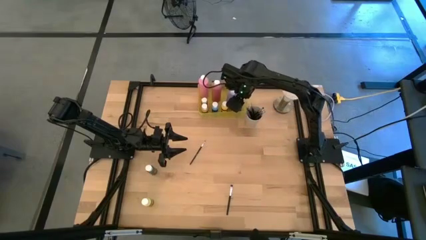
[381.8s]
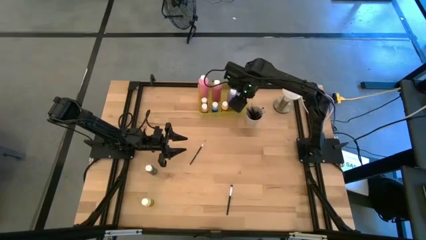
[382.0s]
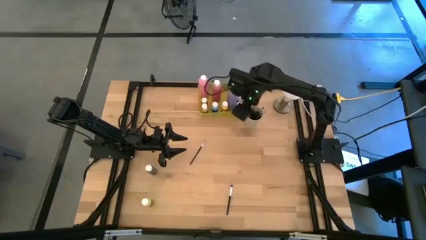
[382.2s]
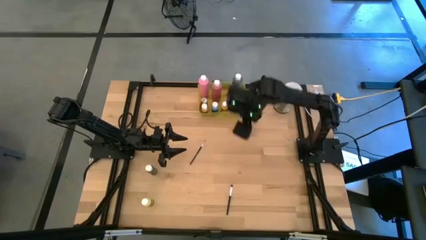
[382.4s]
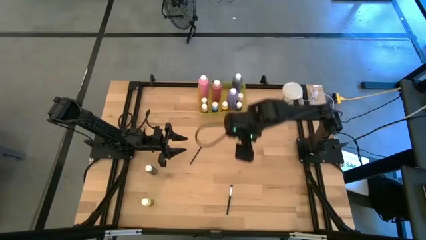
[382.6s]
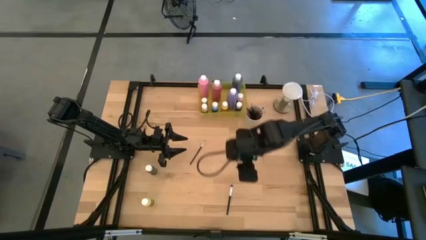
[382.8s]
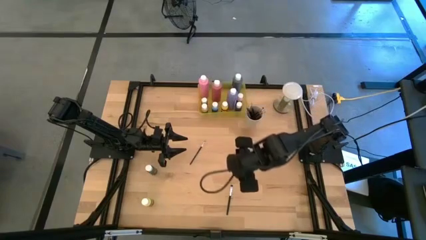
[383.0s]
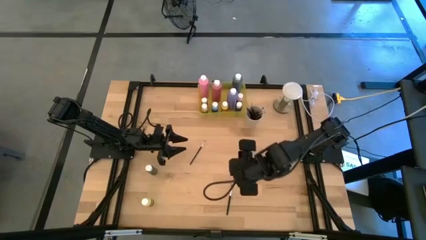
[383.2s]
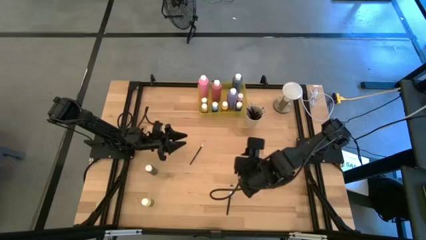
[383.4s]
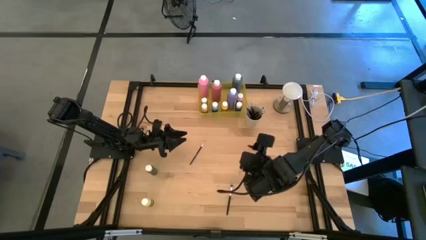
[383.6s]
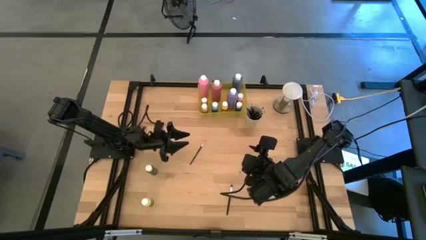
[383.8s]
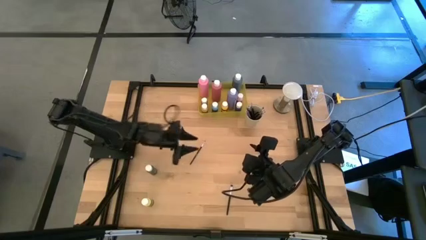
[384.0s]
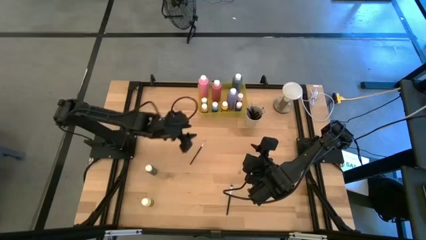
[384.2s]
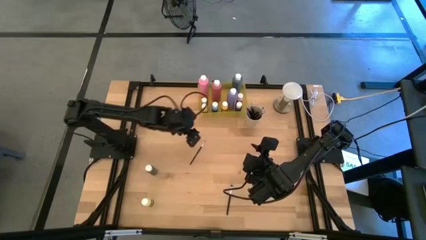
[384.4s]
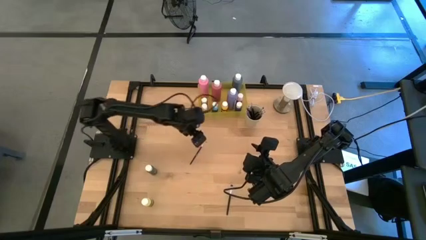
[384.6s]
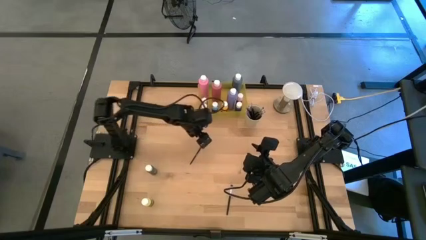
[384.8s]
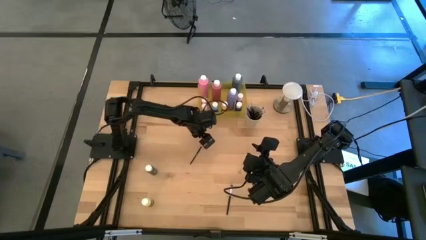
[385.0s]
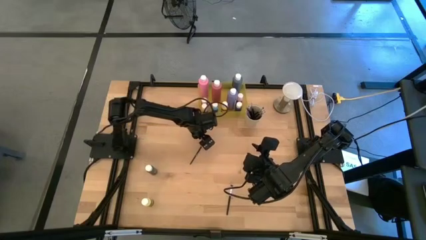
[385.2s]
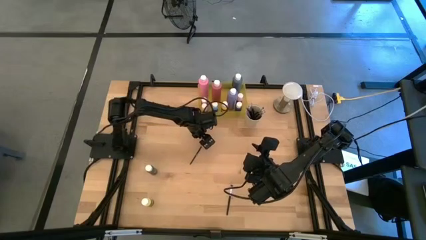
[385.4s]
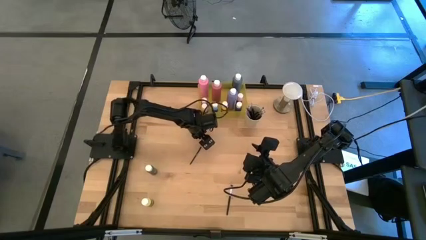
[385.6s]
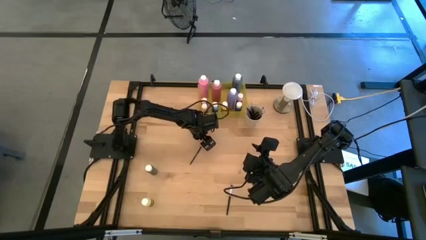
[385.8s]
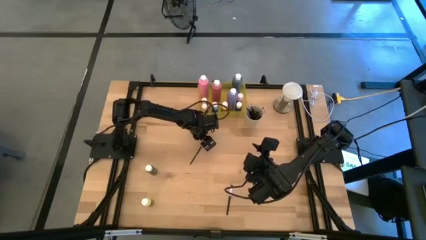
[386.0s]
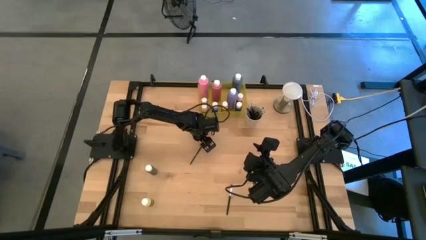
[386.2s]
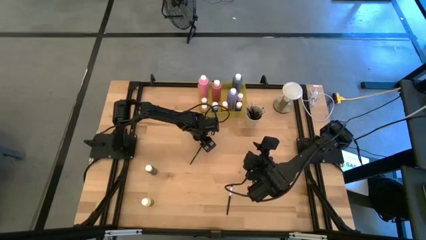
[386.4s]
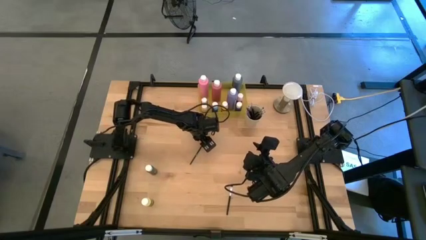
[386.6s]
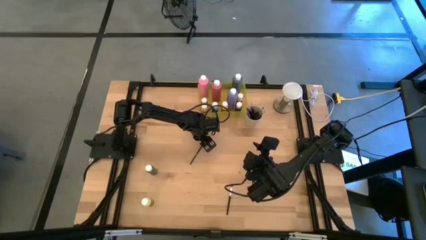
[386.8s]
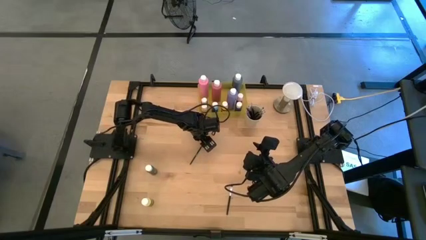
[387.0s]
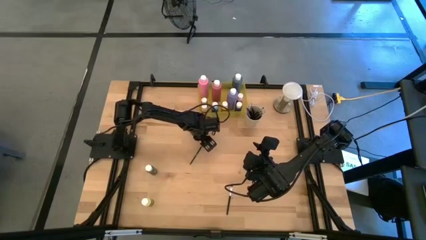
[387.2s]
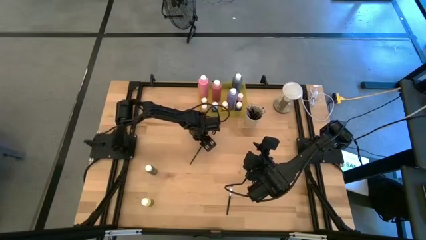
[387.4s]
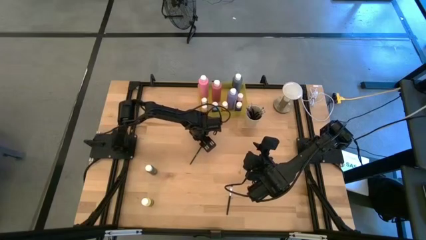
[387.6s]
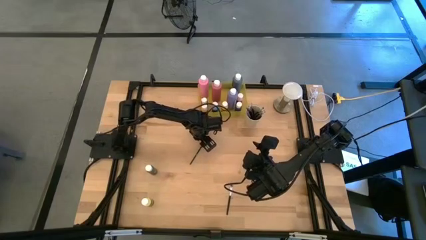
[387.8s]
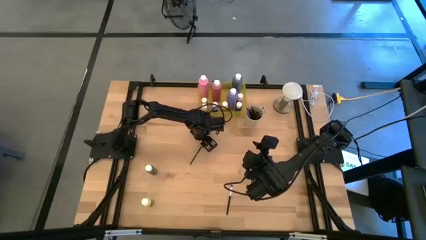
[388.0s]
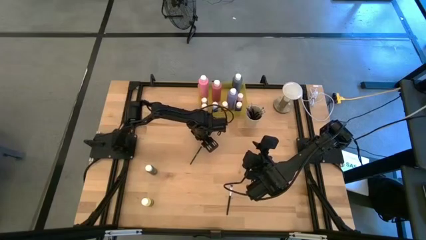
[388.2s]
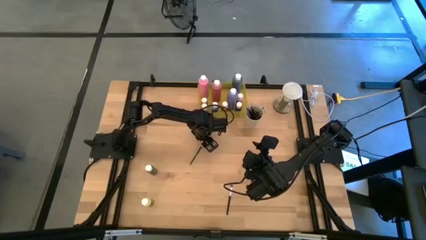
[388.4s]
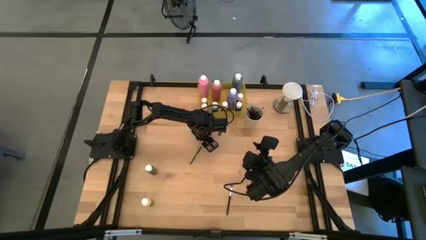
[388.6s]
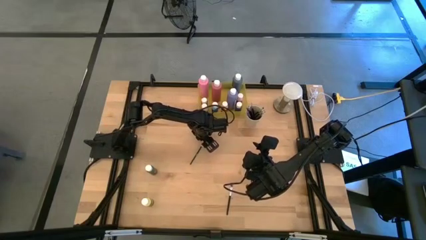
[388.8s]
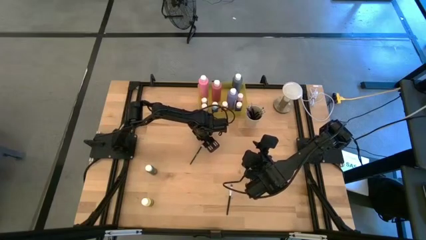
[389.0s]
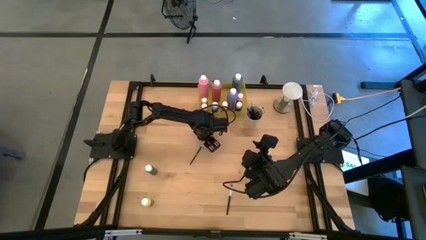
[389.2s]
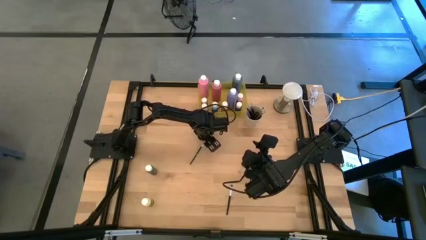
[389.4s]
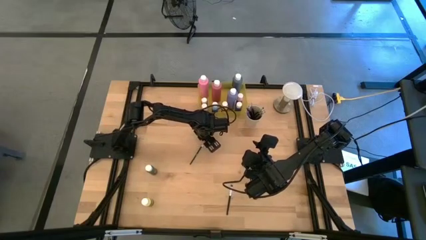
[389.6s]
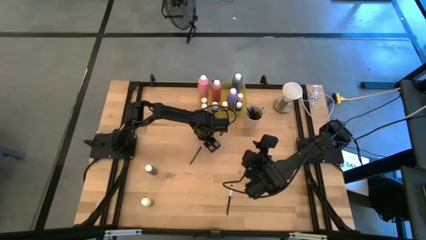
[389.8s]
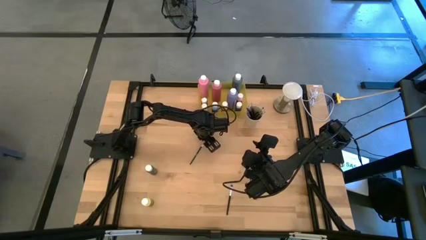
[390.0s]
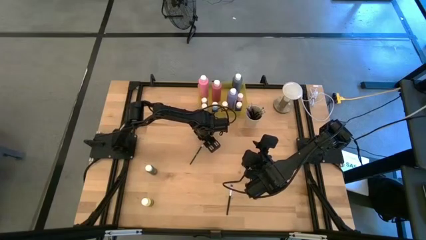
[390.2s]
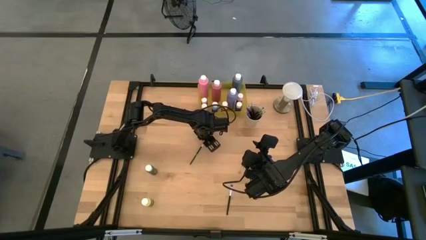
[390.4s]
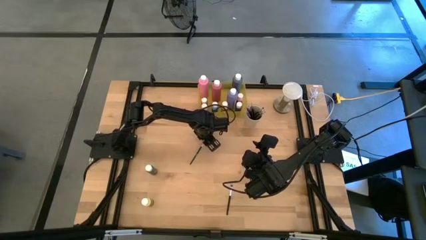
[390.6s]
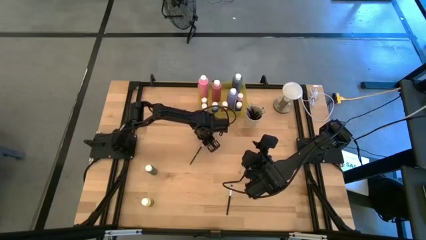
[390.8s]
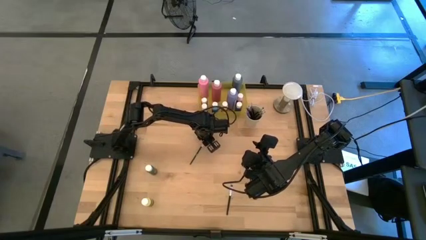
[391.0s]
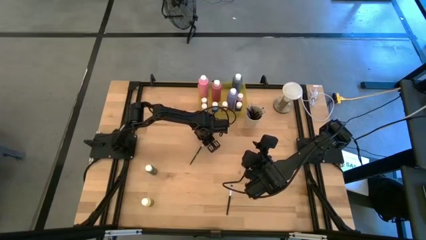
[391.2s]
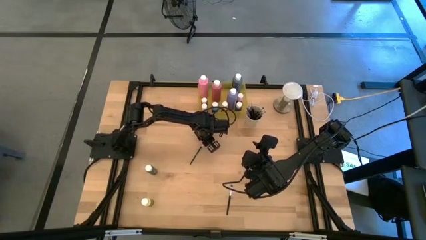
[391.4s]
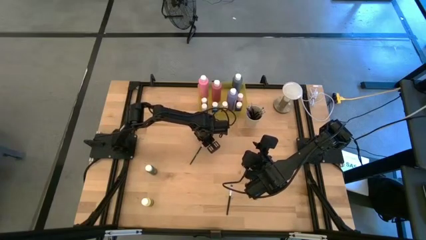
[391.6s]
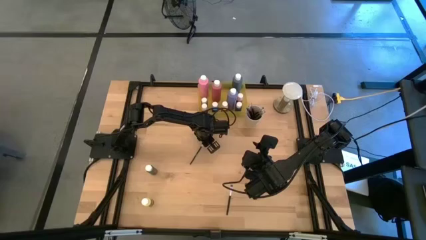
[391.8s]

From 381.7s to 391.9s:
Task: Pick & Place Paint Supplies
Put the silver paint brush into the white cup

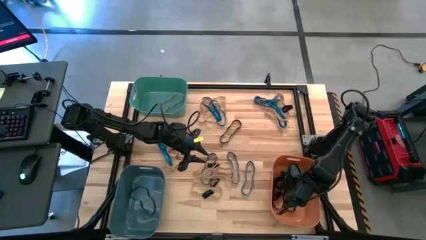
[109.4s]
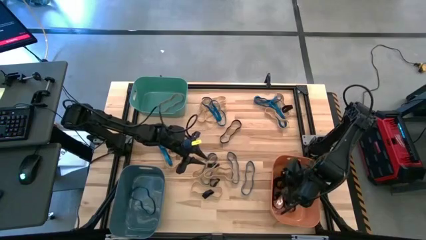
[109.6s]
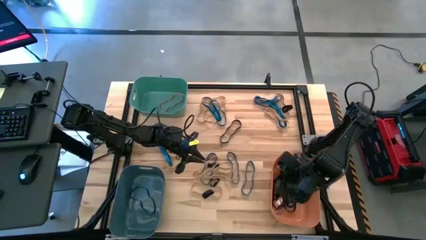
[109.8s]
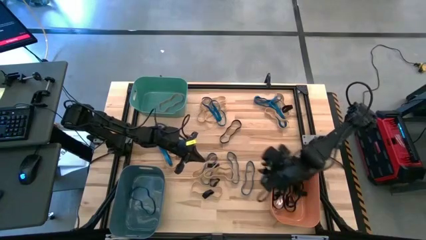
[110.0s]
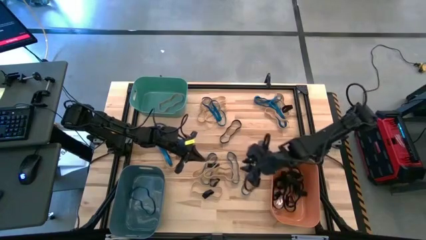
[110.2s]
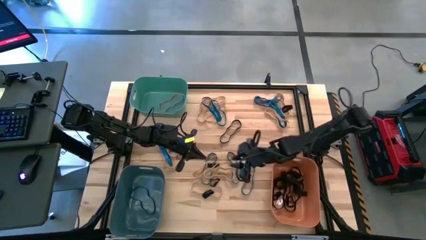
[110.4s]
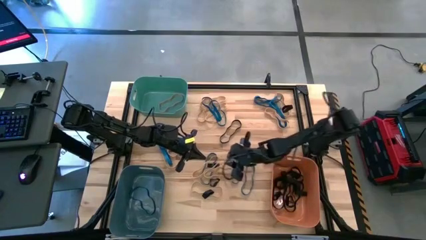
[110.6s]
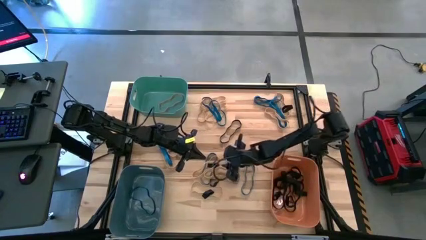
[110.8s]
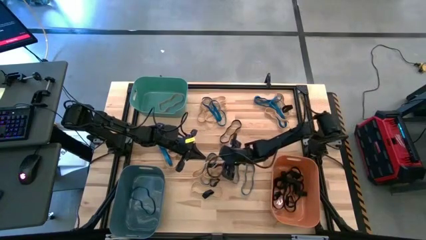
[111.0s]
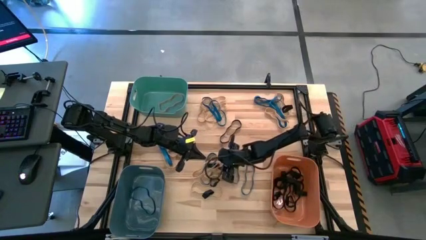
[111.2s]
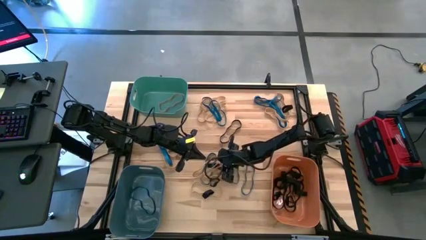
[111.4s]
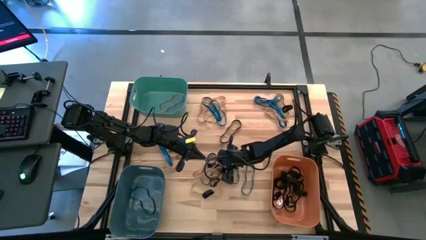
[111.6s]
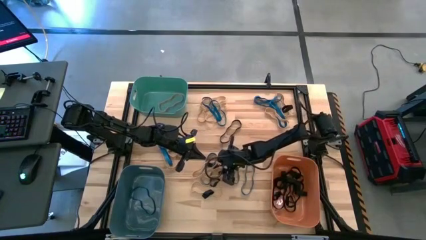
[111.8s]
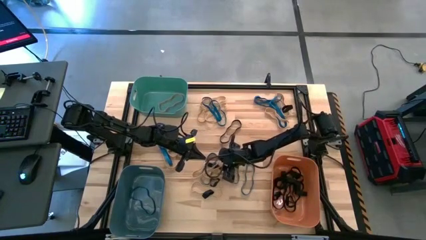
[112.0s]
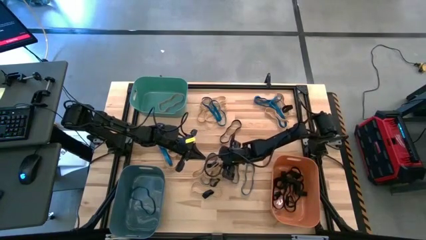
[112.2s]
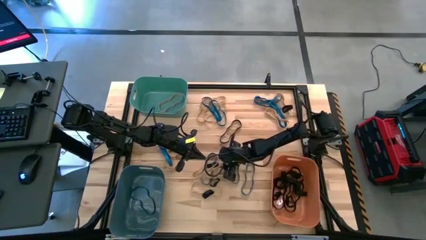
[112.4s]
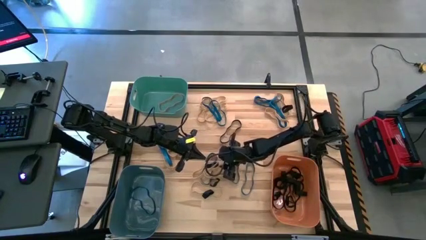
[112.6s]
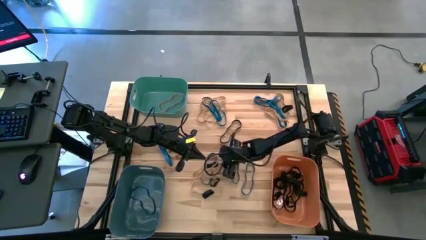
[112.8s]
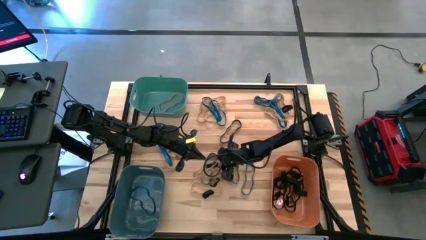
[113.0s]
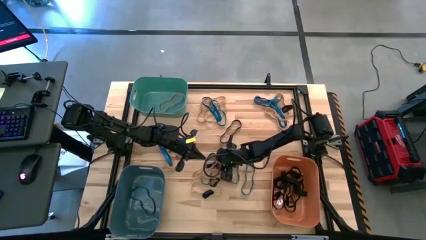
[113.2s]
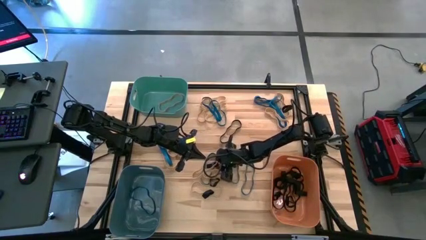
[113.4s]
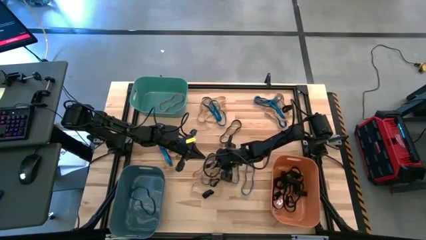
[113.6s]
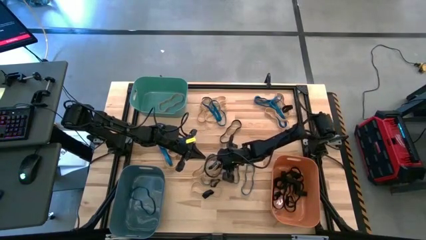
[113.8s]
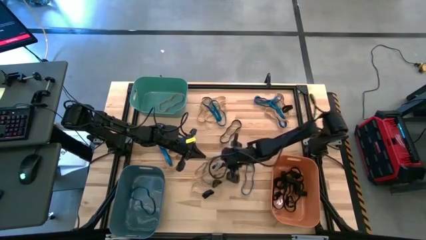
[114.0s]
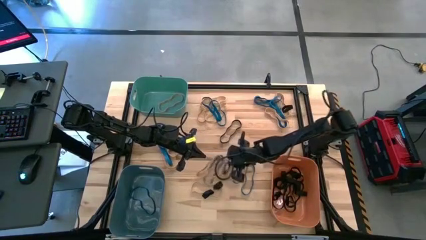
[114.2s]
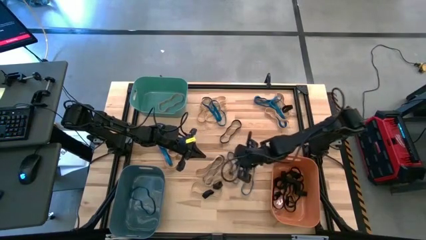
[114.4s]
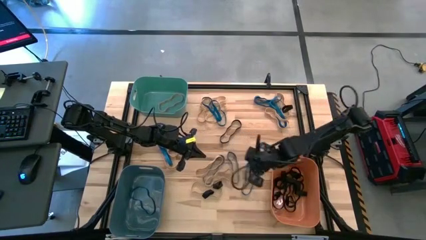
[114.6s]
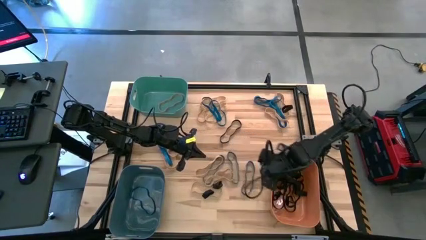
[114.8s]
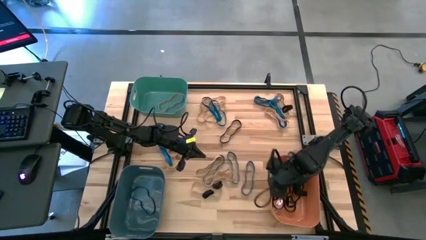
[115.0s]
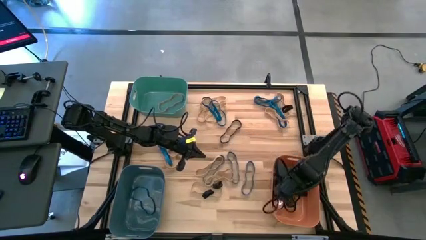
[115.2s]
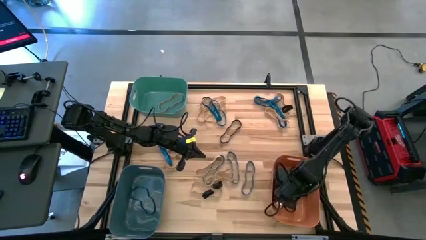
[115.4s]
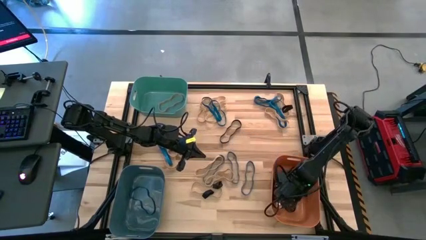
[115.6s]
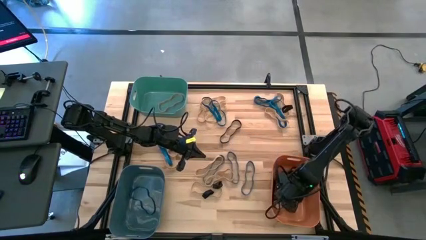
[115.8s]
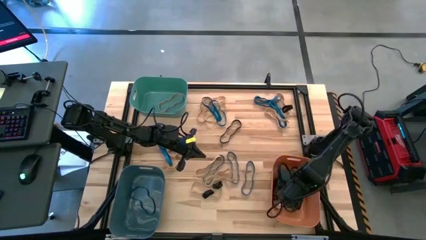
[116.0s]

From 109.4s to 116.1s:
Task: Sort rubber bands into baskets
Put the black rubber band into the orange bin
